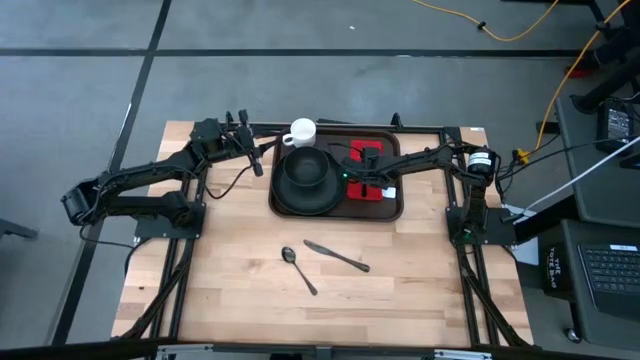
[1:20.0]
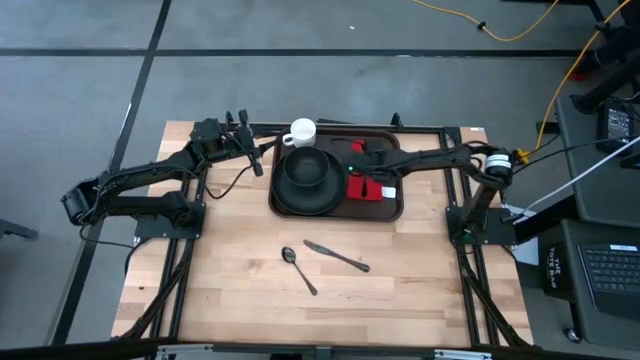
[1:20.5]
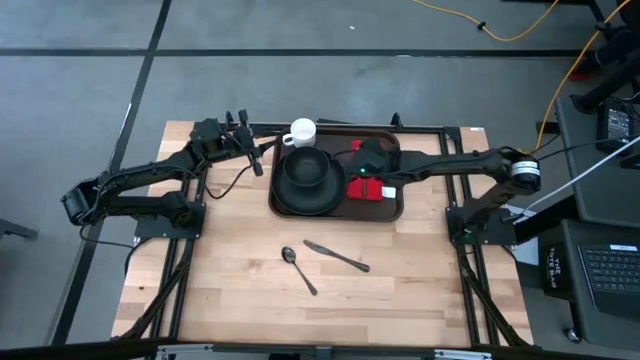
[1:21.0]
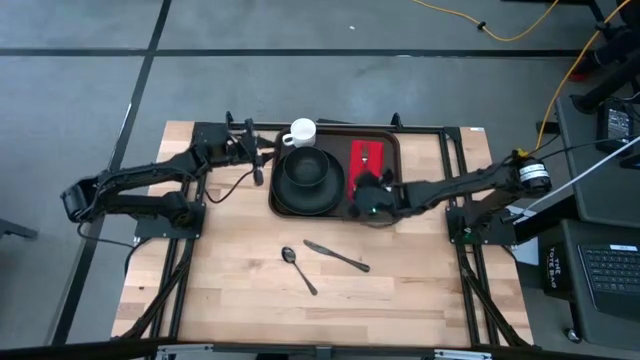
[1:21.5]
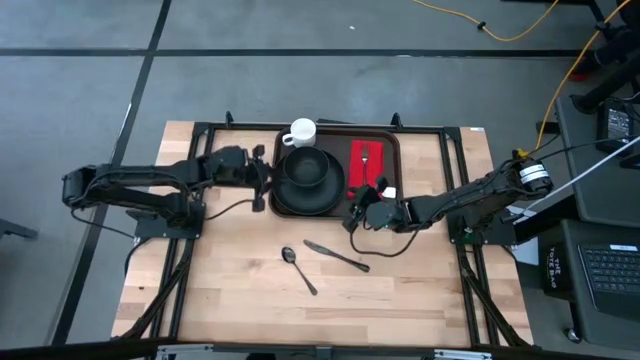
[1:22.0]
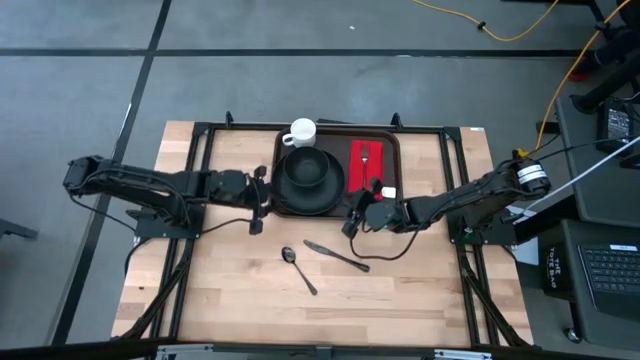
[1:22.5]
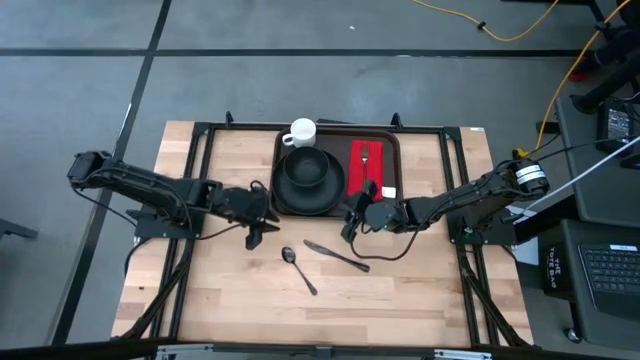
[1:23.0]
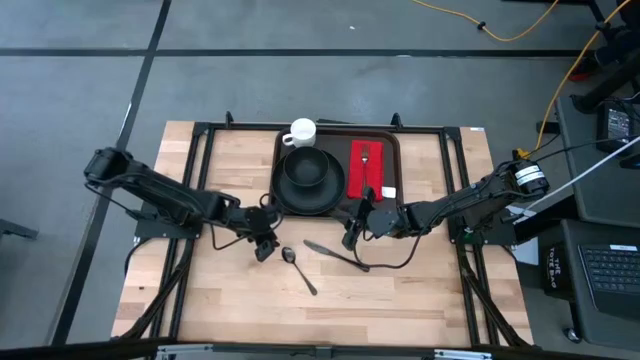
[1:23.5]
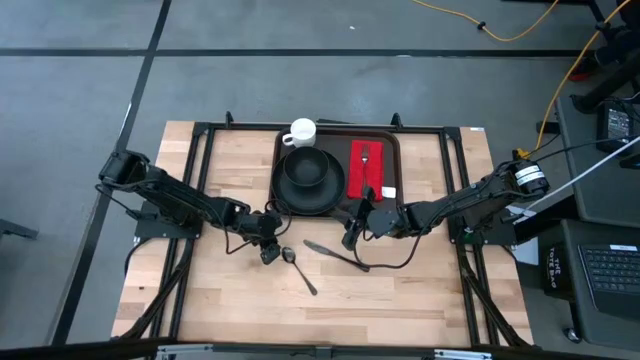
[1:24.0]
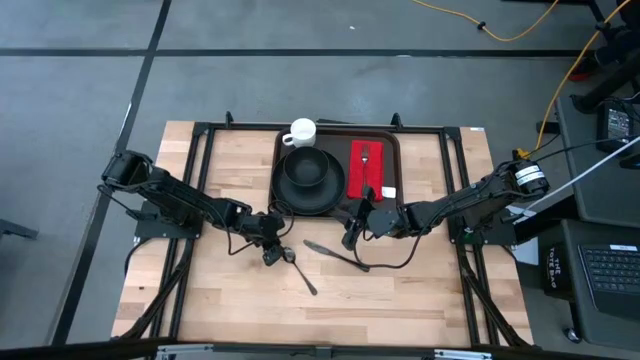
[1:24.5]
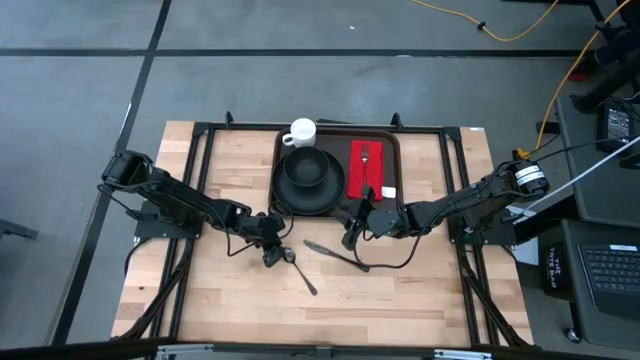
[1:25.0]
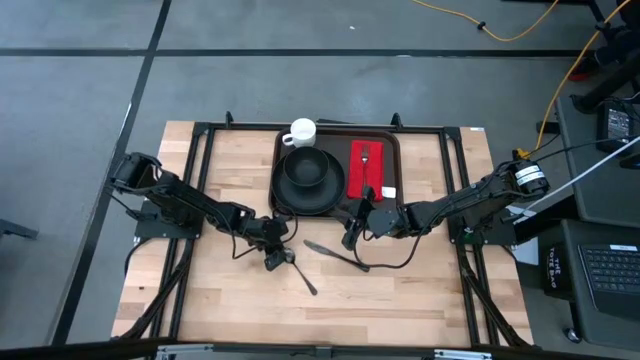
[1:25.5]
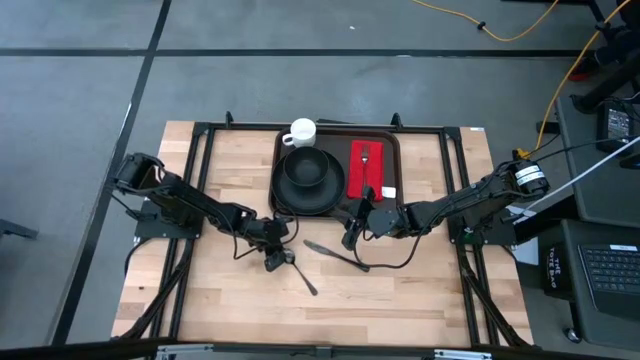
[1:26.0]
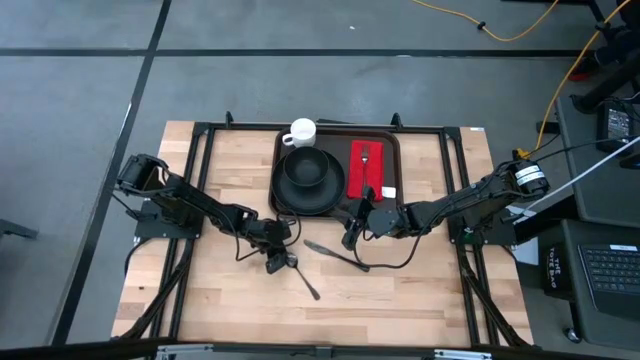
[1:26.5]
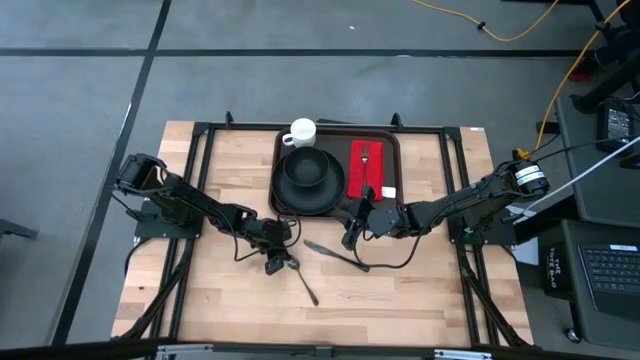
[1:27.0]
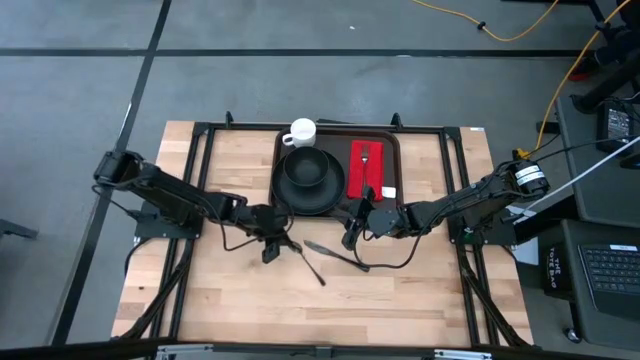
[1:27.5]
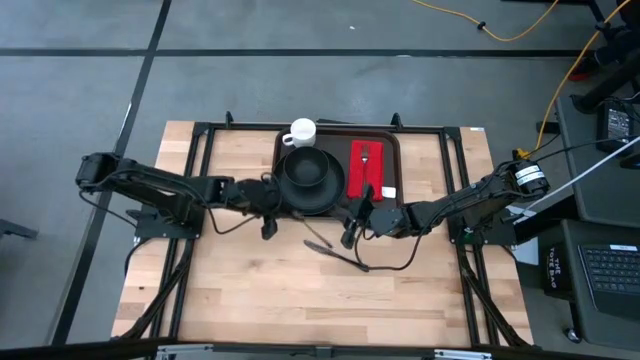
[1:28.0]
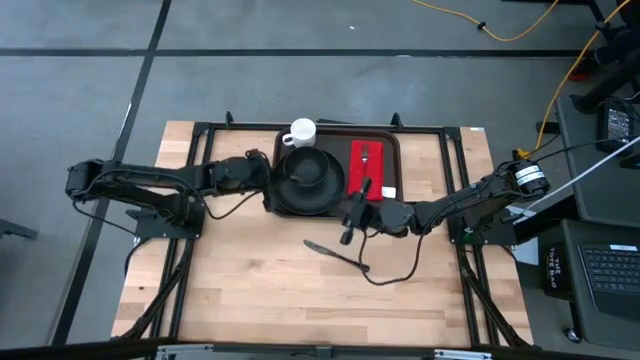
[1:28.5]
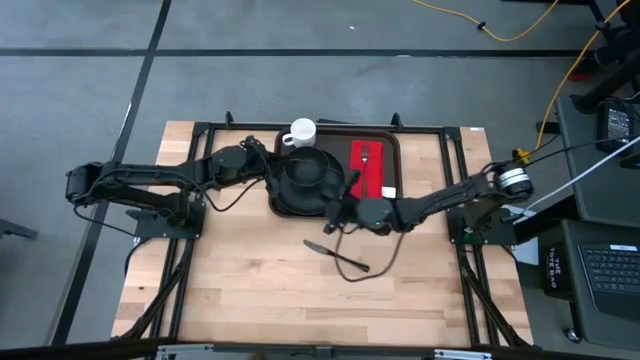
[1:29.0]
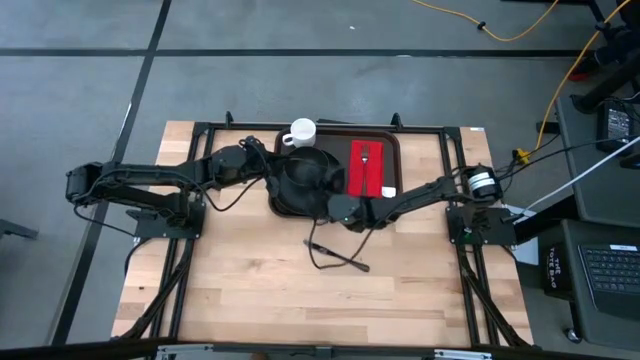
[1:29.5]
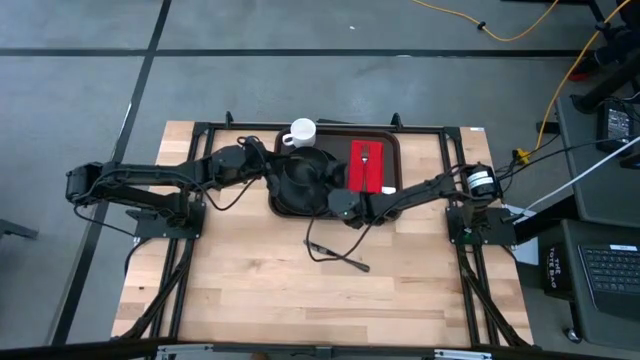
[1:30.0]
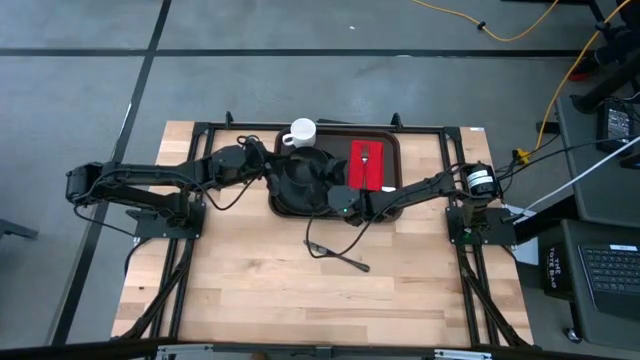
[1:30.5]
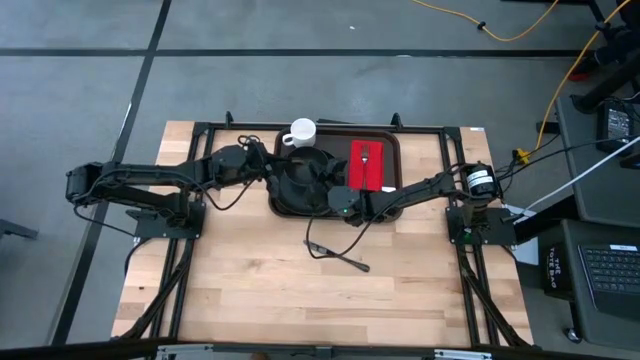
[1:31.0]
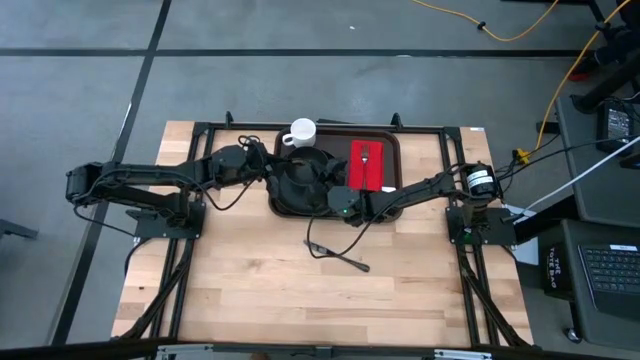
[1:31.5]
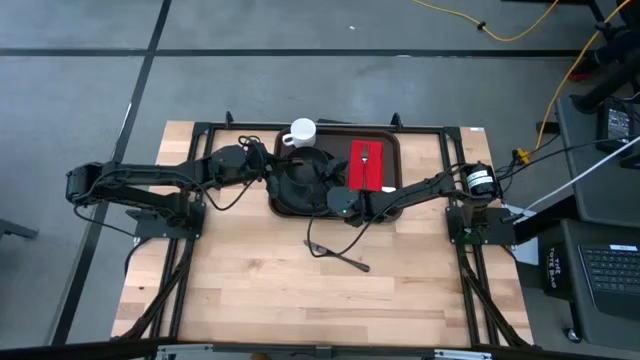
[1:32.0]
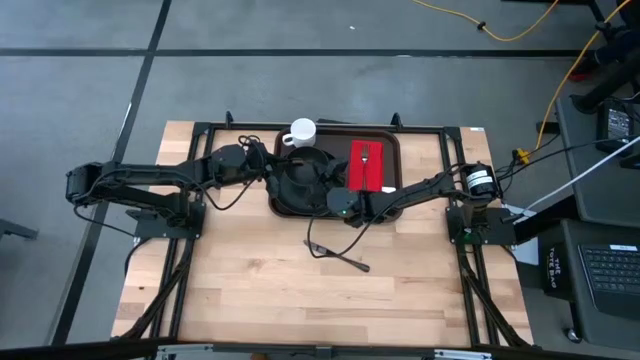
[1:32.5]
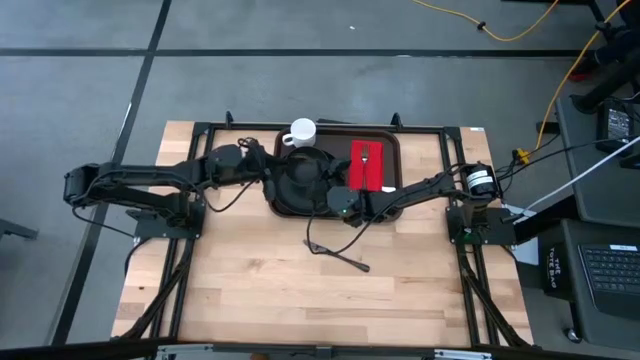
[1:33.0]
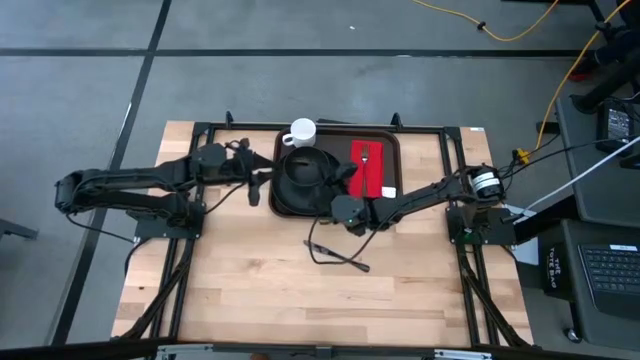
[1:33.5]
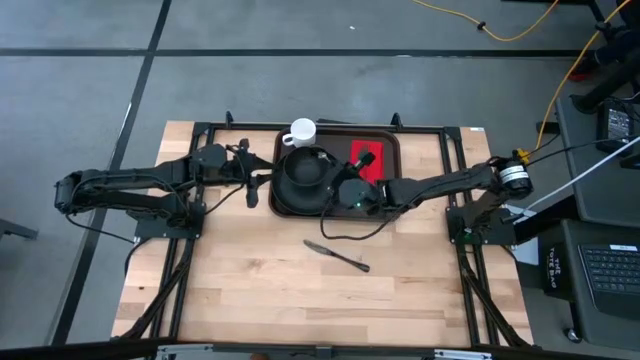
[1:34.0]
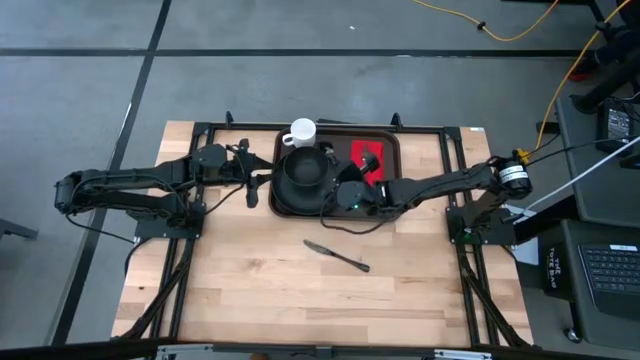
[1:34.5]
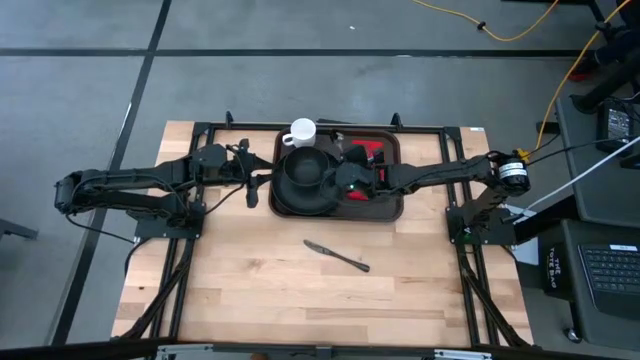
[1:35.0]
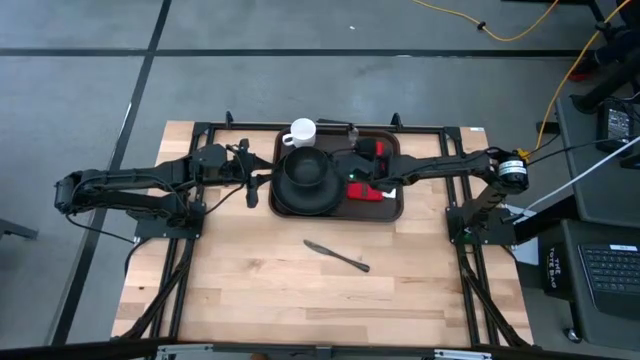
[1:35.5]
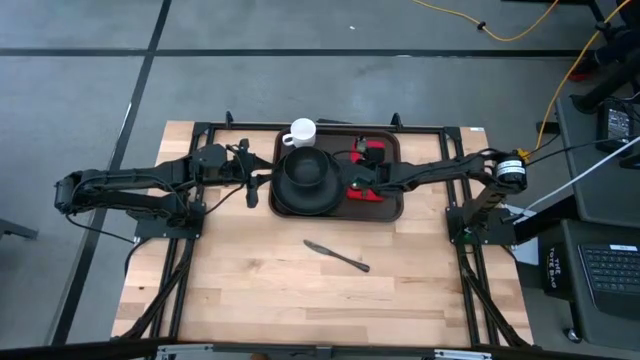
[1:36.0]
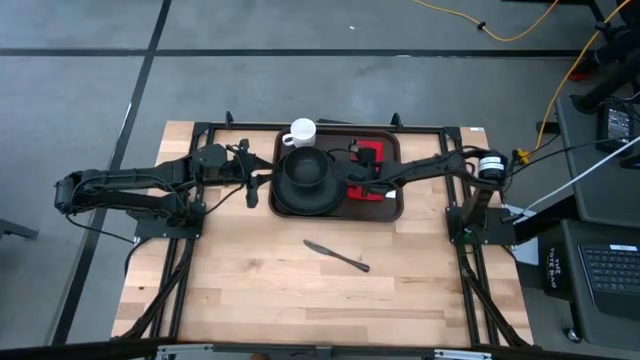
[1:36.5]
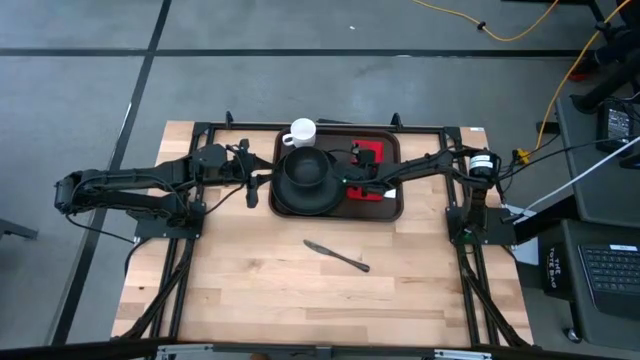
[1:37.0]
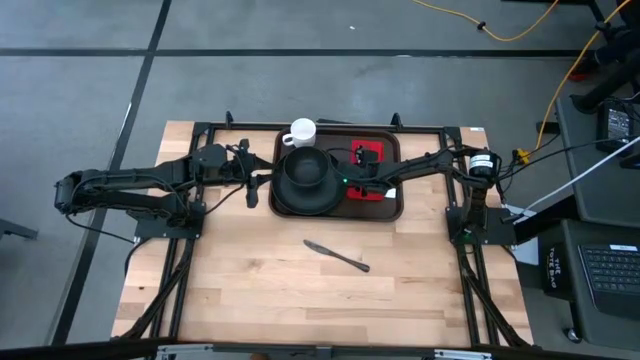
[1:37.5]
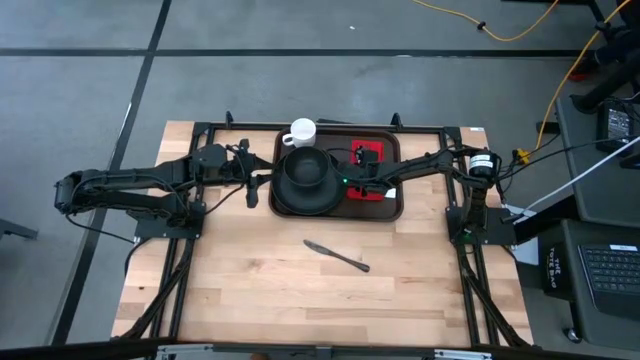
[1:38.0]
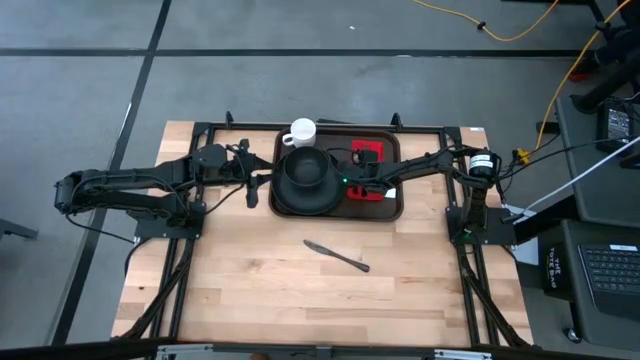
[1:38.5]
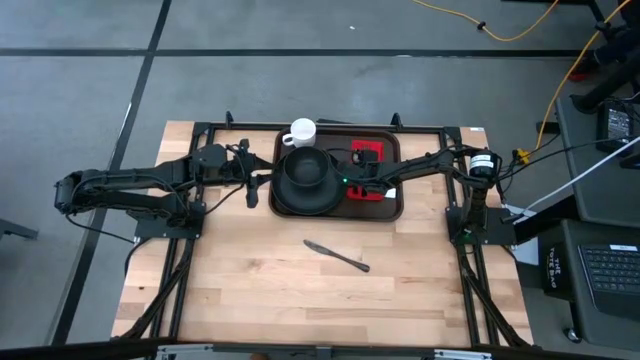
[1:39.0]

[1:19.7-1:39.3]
Task: Set up tray
Put the black spoon on the red table napkin to the left of the black fork

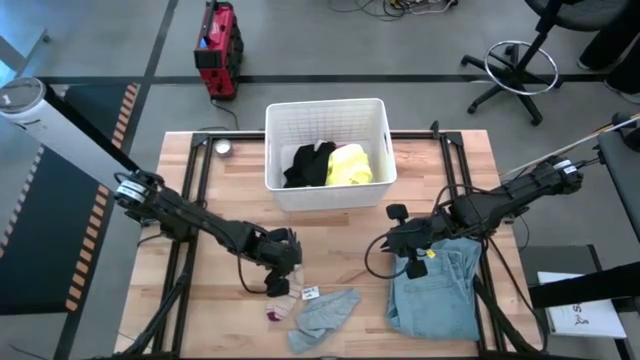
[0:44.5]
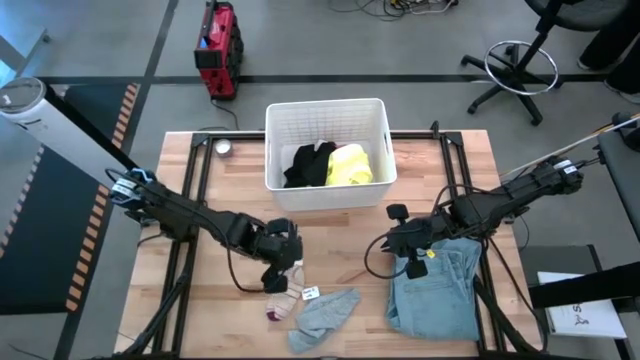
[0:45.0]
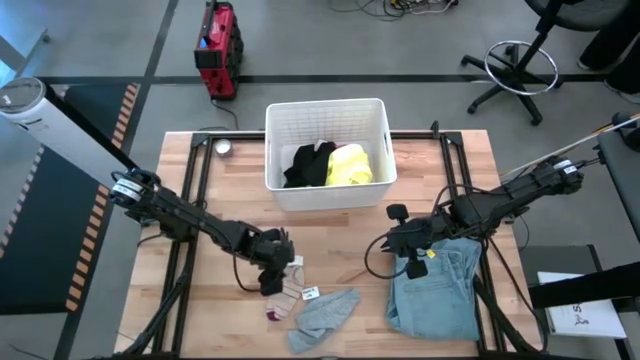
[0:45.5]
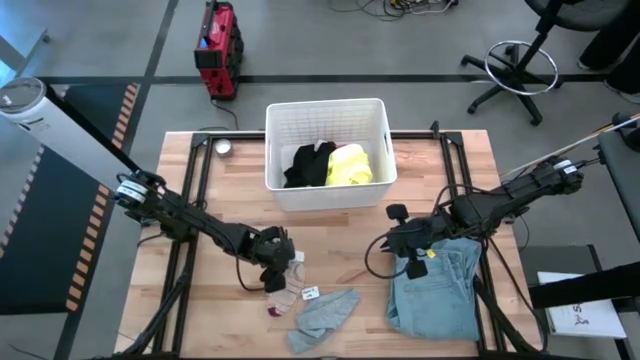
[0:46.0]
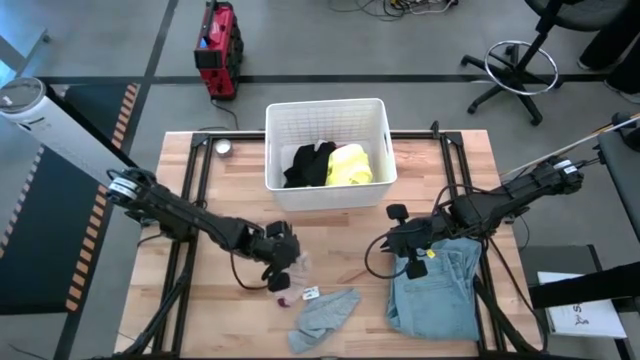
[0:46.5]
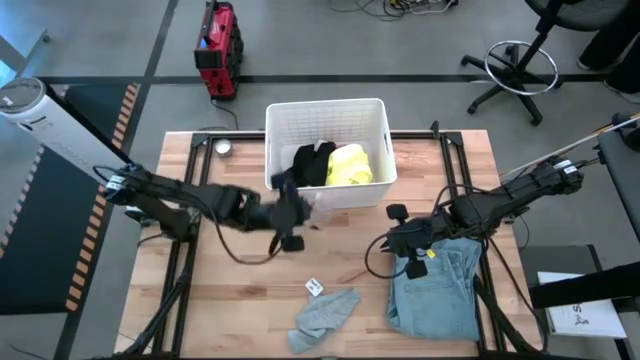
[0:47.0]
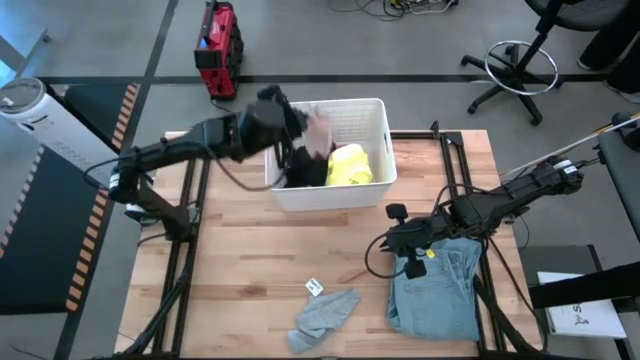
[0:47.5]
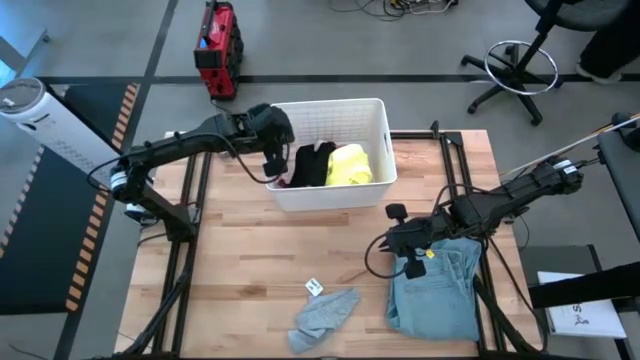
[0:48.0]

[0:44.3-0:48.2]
Task: Sort clothes
Put the striped sock into the white laundry bin
